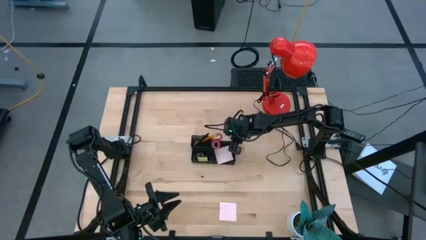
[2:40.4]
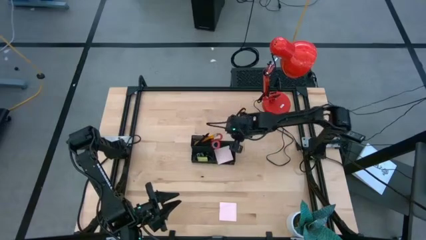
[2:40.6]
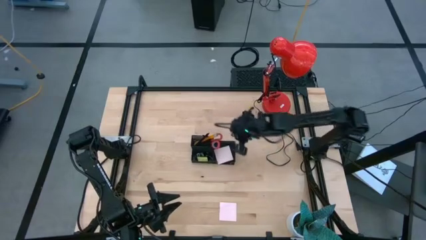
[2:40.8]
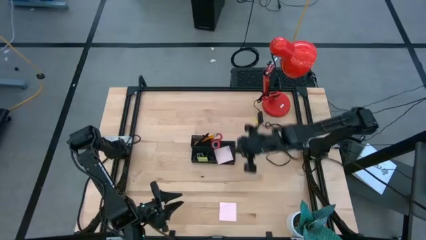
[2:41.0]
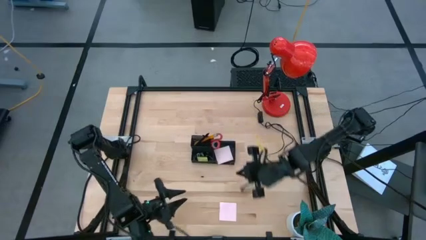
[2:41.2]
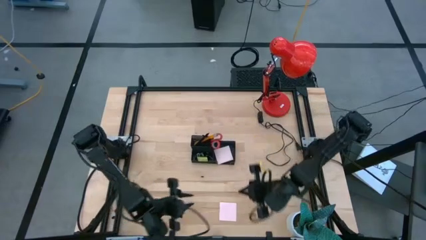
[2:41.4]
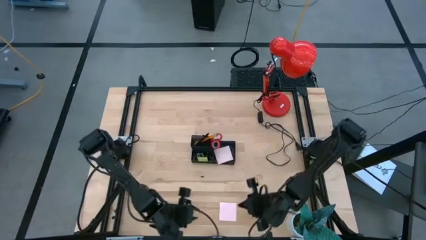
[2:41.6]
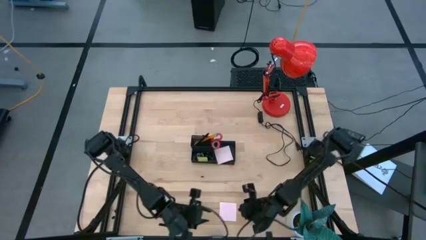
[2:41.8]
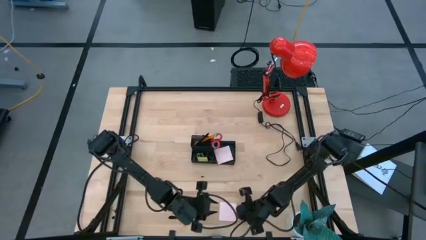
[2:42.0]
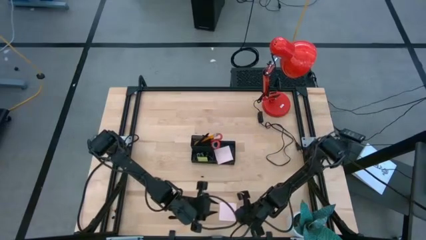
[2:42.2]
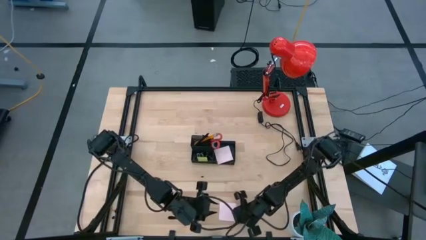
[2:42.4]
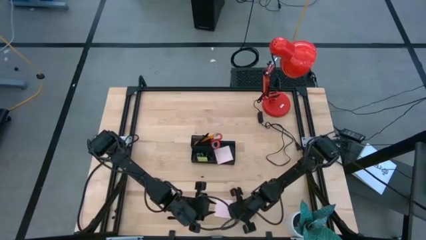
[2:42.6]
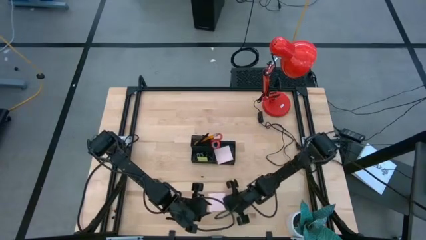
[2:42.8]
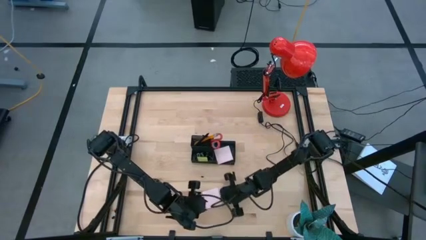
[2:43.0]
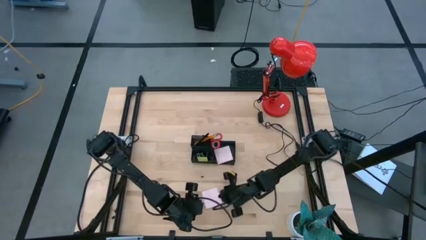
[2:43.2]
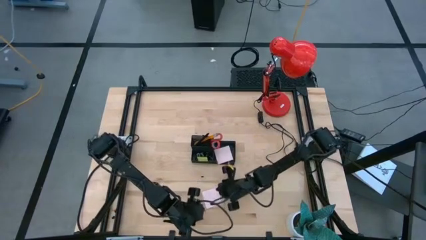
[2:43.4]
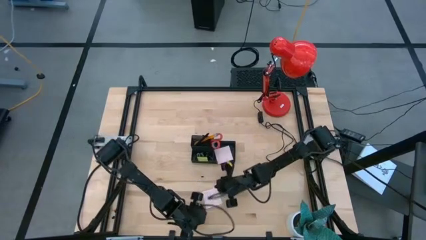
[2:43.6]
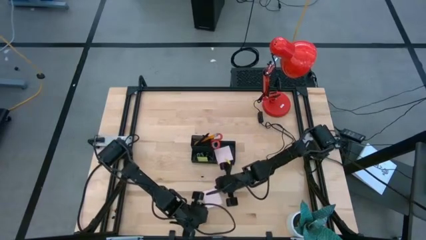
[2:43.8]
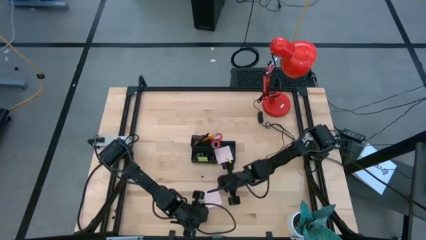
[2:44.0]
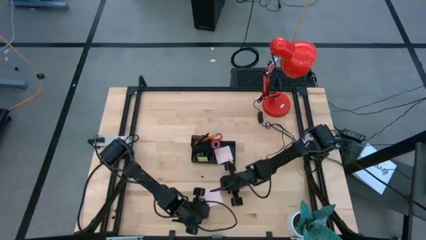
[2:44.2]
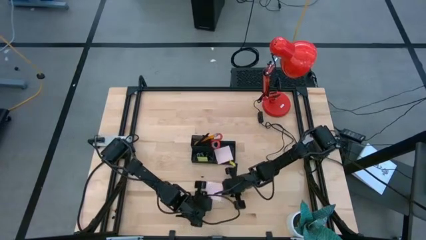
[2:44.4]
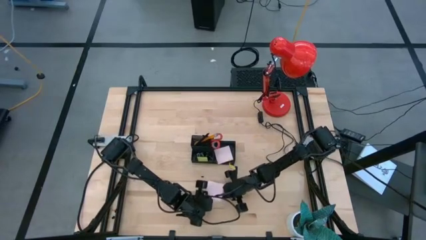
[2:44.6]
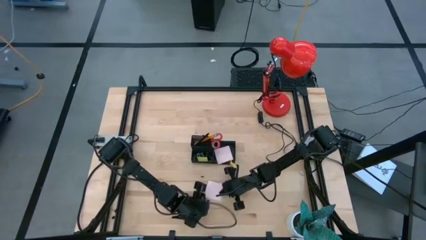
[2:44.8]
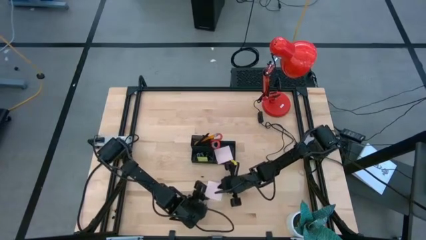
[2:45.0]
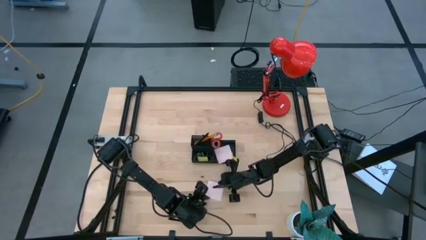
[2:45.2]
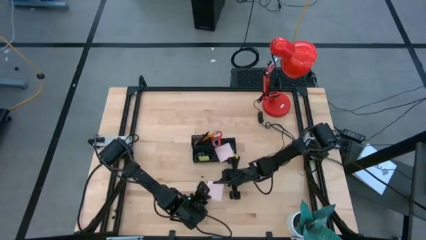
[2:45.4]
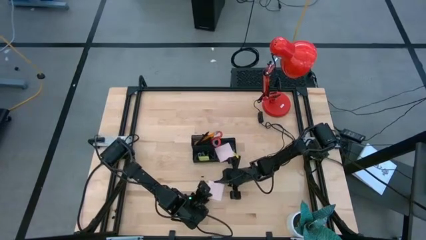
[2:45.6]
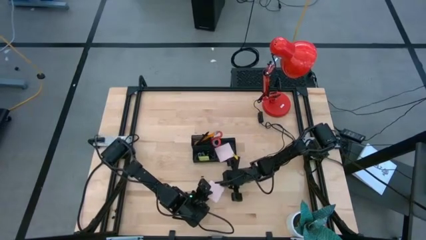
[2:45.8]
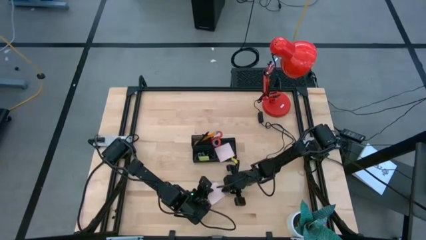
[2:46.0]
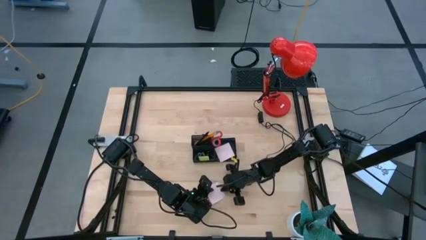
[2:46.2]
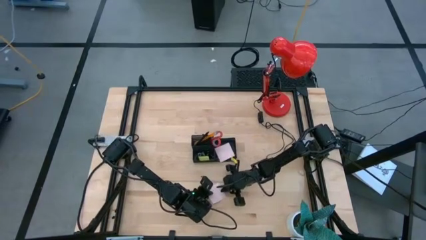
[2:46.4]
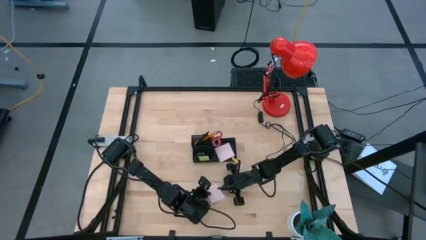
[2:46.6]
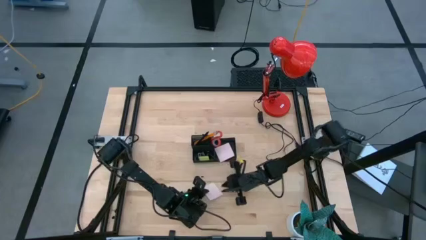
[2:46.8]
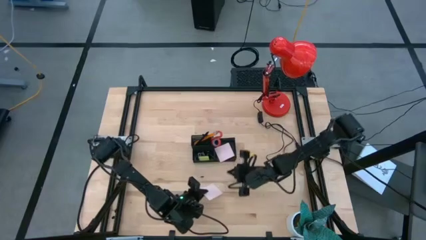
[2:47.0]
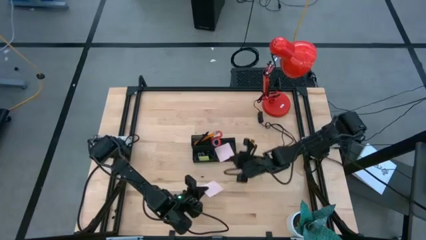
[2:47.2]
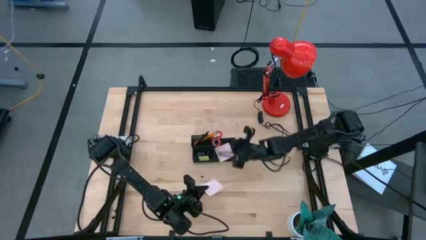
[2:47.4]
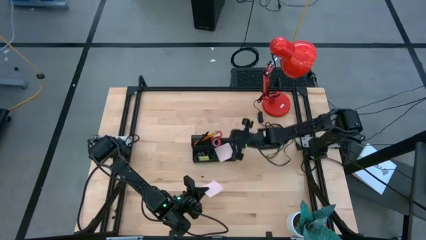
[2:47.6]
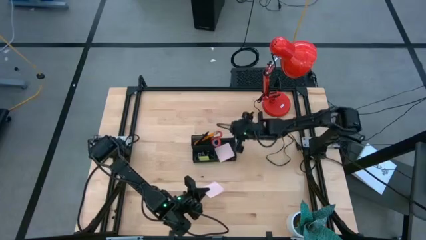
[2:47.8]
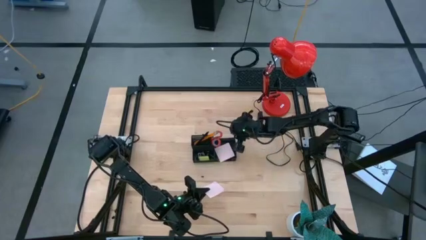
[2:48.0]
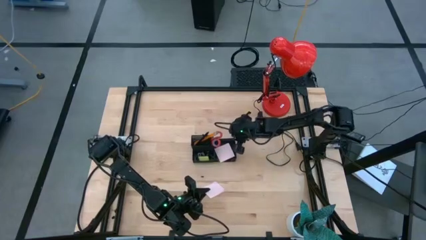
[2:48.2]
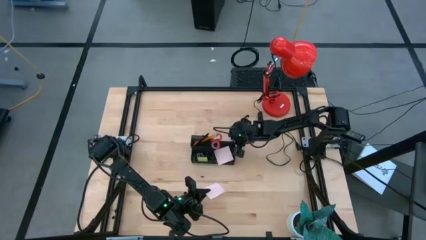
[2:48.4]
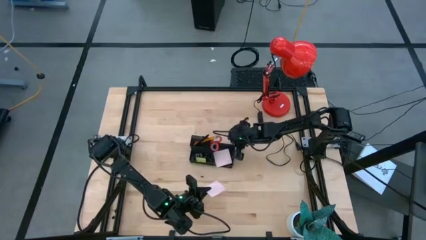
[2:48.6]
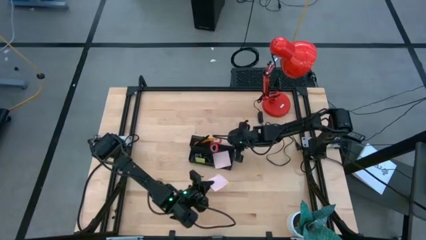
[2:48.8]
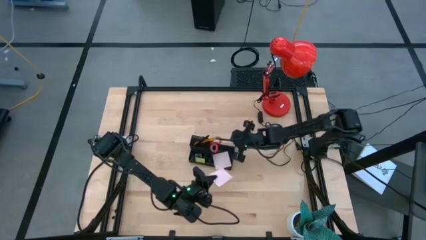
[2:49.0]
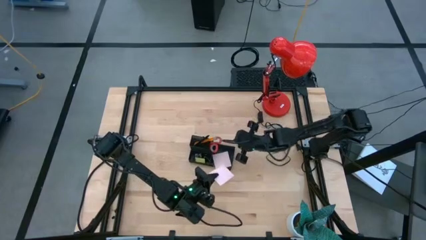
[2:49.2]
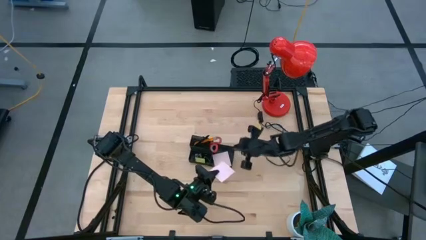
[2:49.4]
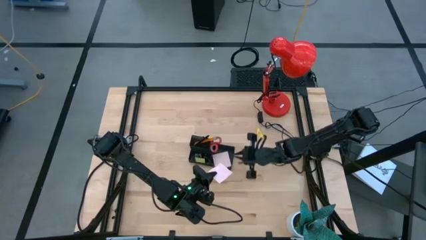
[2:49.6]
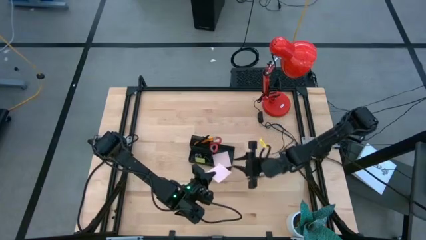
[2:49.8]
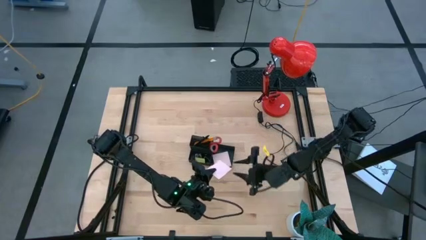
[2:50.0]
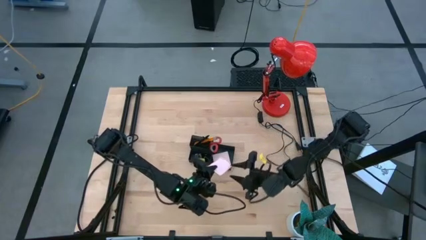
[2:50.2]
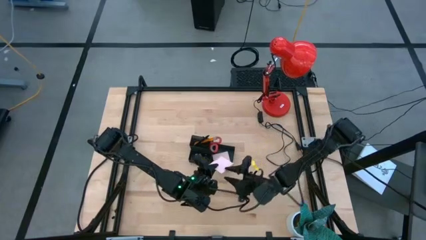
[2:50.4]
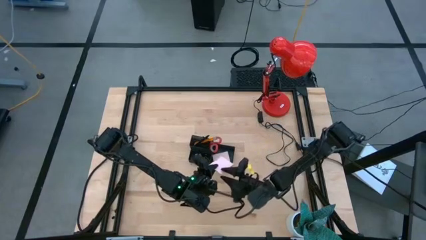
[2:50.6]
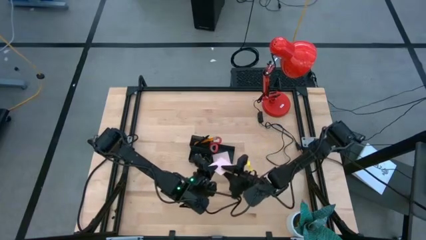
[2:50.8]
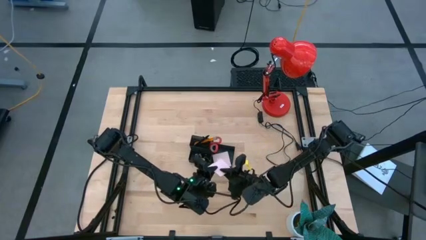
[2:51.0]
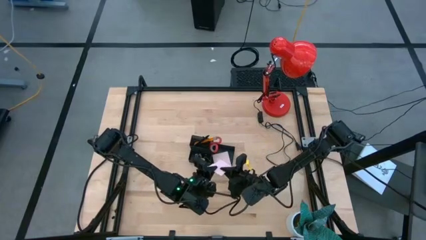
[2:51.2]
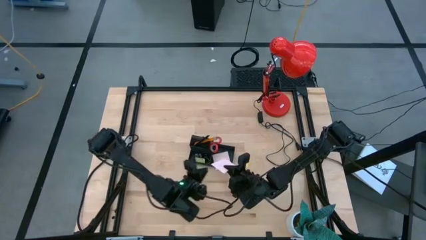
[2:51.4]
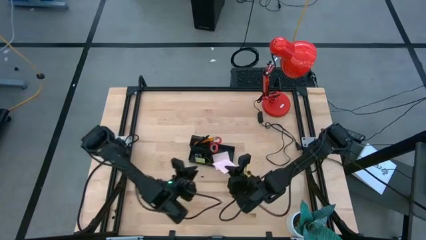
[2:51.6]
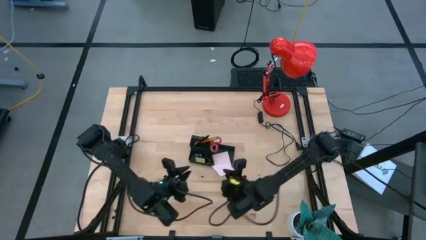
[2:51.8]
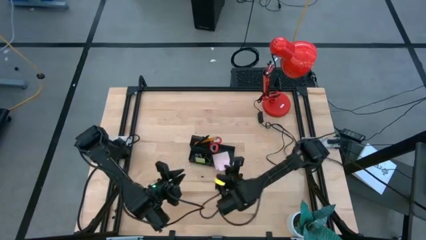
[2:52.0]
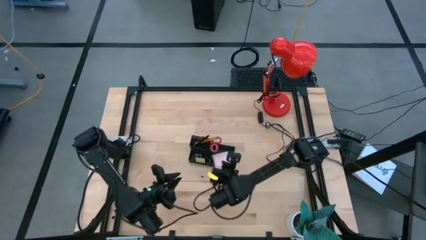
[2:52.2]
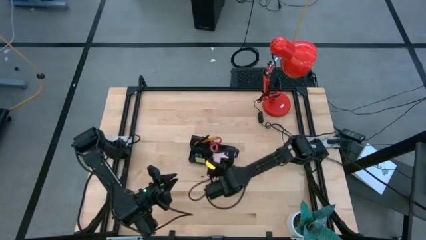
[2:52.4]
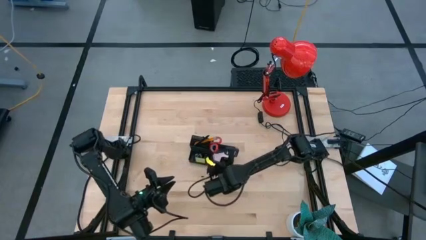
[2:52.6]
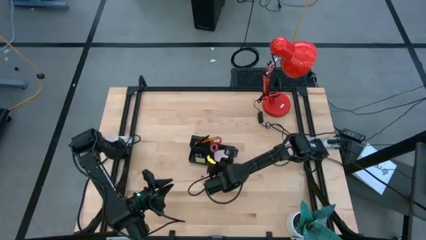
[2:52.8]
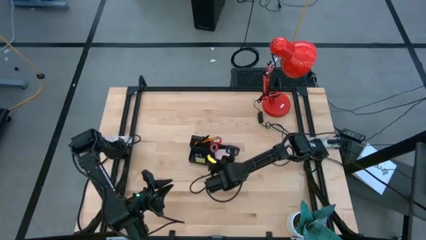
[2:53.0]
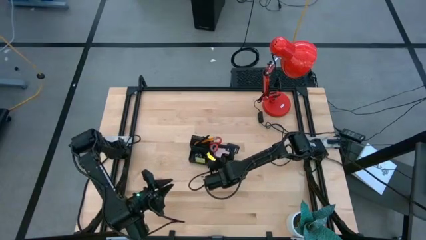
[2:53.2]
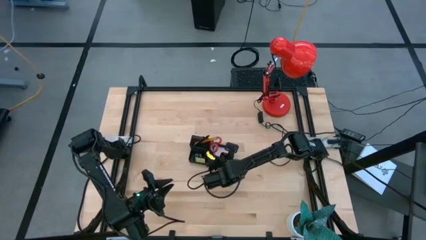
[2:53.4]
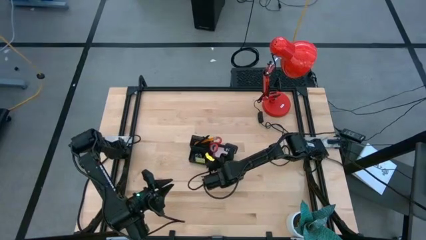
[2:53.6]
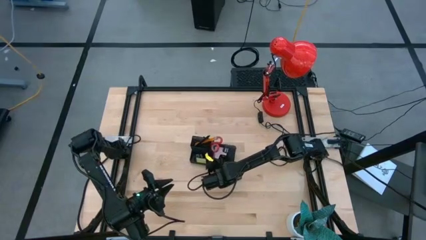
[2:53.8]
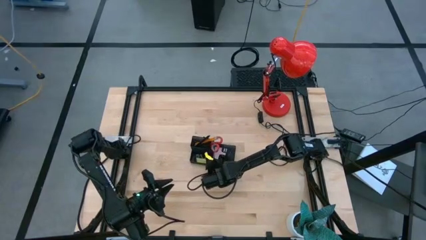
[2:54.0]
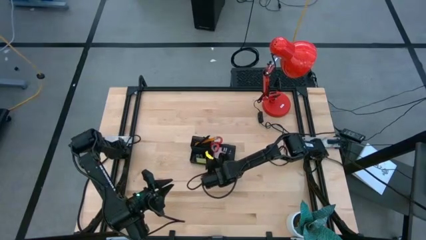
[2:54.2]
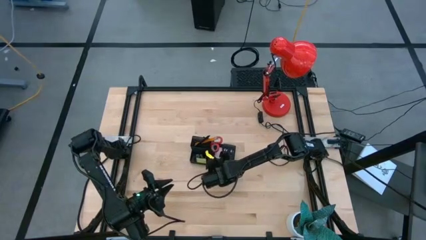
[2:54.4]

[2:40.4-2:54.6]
Task: Pick and place office supplies into organizer
Put the pink sticky notes into the black desk organizer

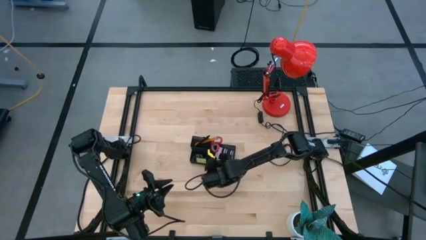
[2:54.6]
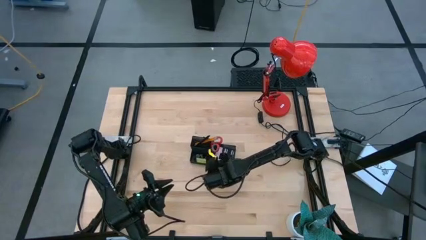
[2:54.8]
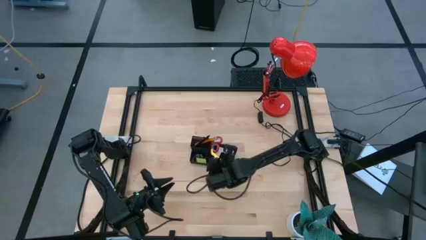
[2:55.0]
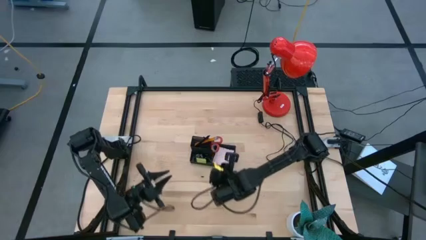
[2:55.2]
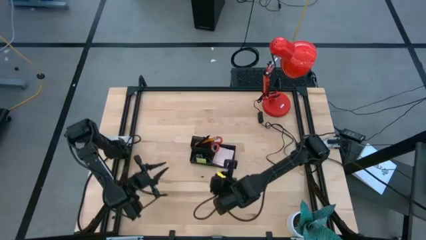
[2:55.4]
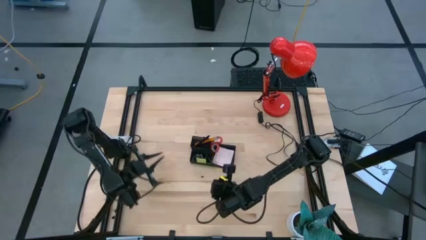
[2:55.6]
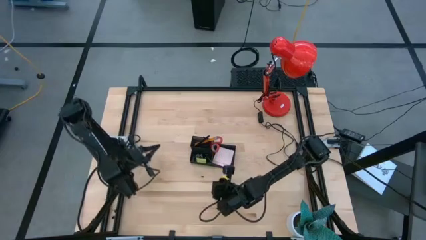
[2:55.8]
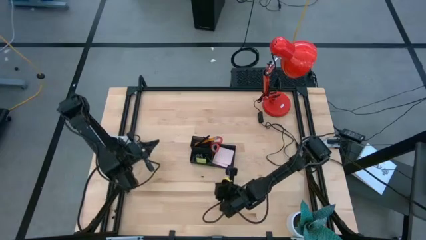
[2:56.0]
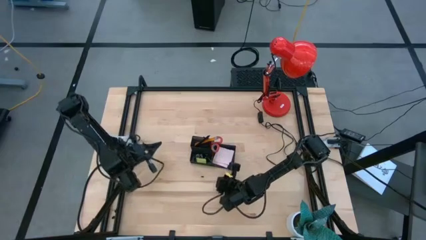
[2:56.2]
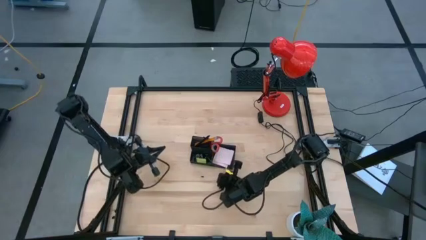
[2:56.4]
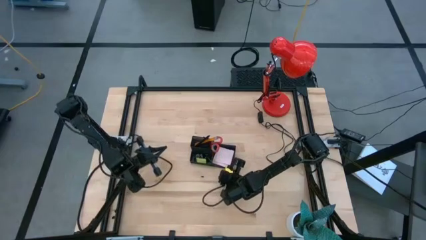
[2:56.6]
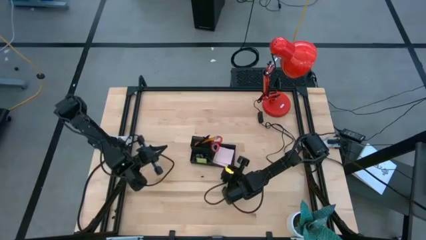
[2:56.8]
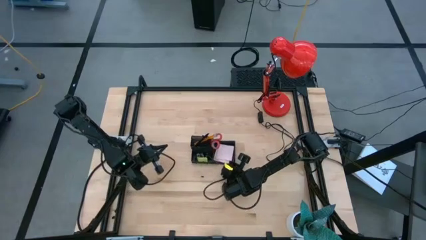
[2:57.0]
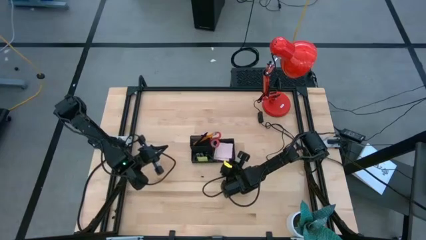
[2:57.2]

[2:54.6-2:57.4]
Adjust the black desk organizer
